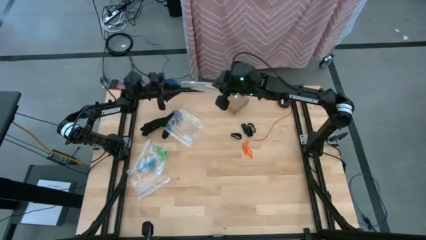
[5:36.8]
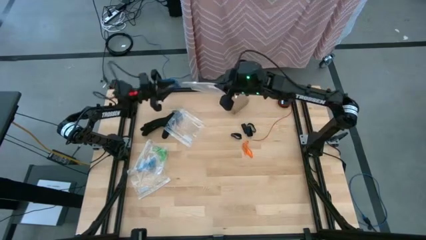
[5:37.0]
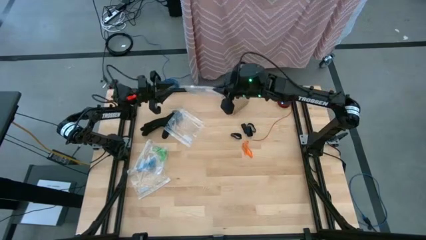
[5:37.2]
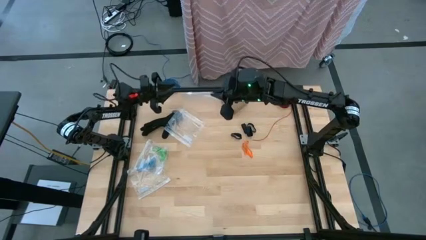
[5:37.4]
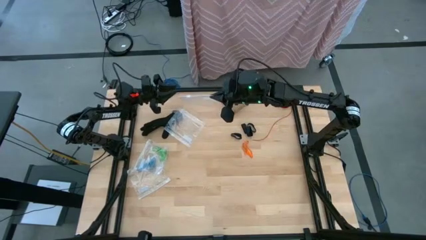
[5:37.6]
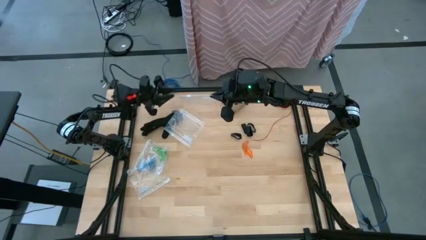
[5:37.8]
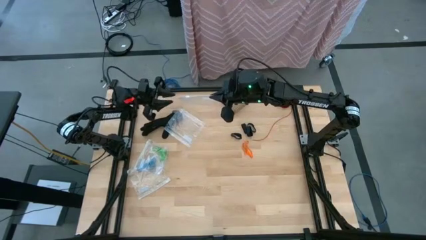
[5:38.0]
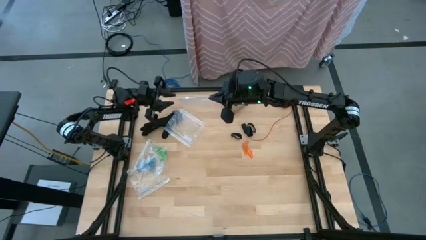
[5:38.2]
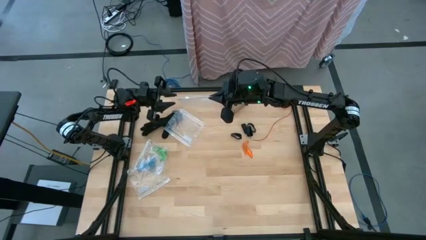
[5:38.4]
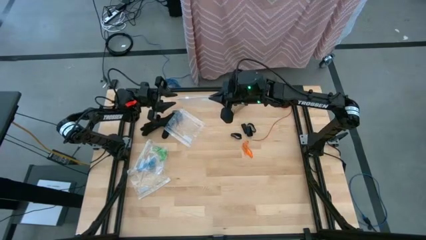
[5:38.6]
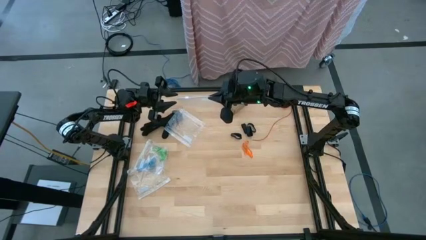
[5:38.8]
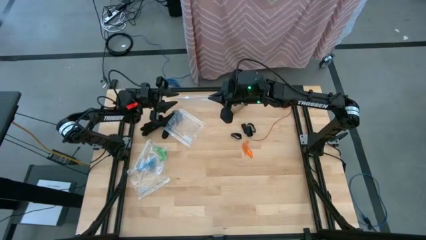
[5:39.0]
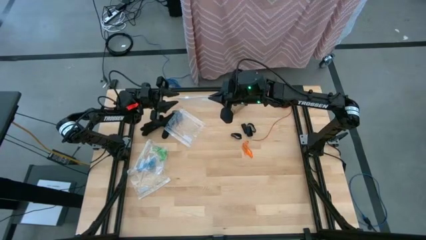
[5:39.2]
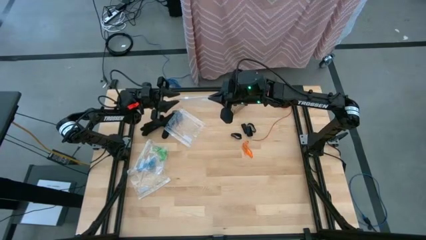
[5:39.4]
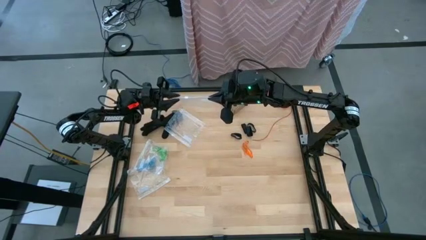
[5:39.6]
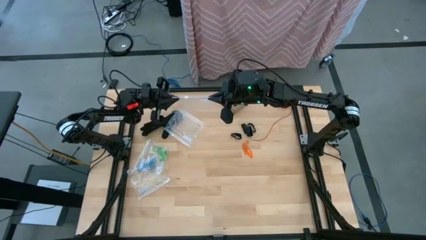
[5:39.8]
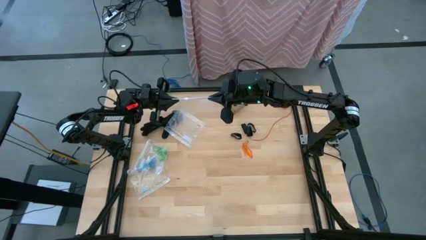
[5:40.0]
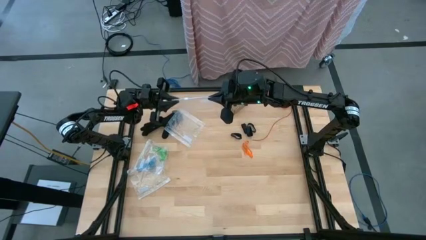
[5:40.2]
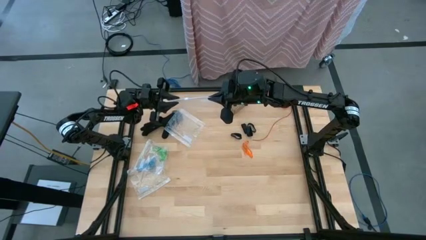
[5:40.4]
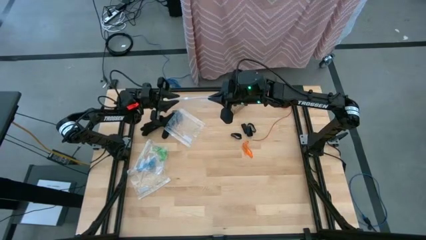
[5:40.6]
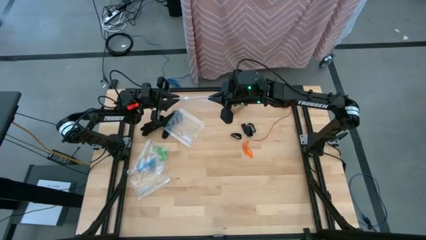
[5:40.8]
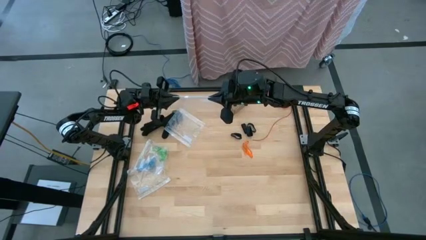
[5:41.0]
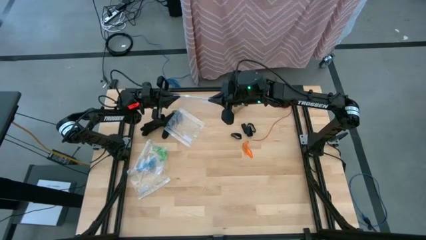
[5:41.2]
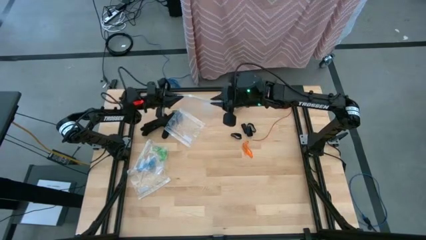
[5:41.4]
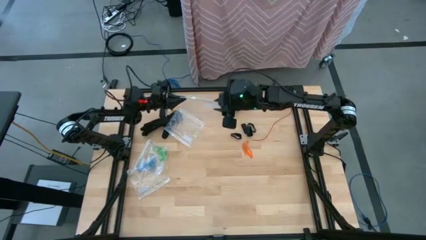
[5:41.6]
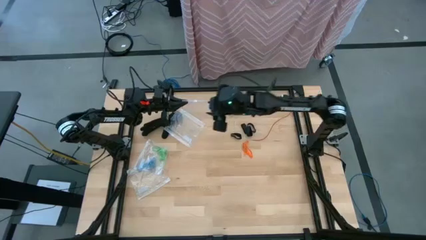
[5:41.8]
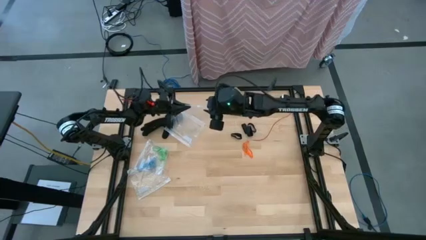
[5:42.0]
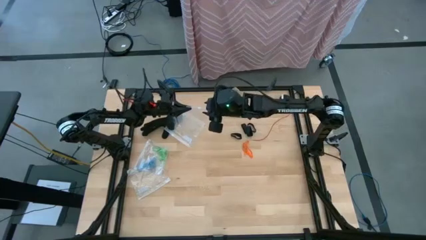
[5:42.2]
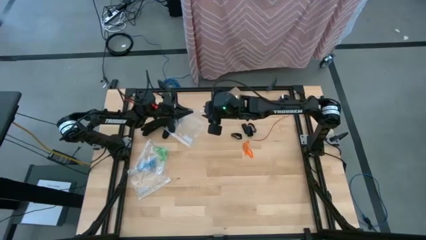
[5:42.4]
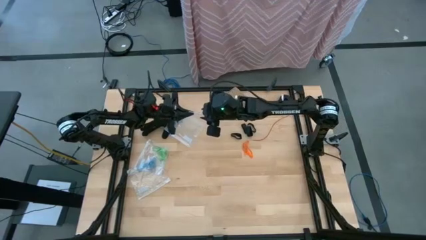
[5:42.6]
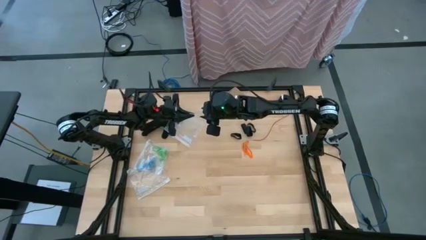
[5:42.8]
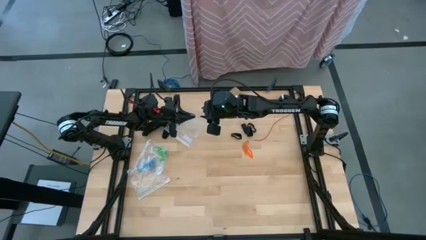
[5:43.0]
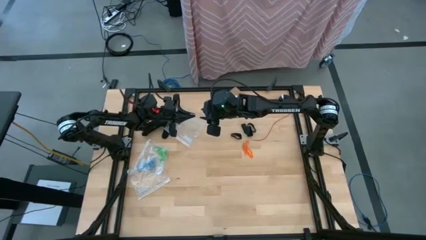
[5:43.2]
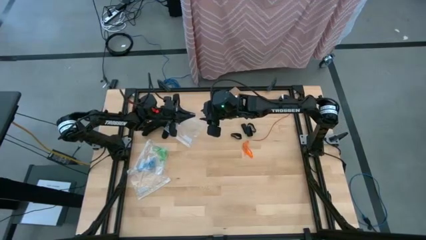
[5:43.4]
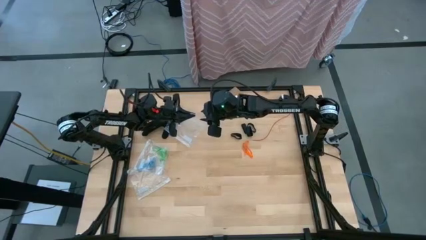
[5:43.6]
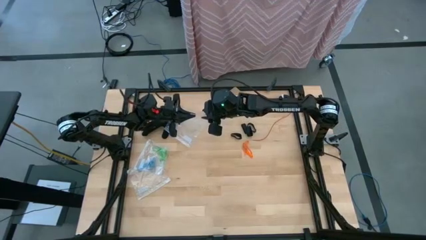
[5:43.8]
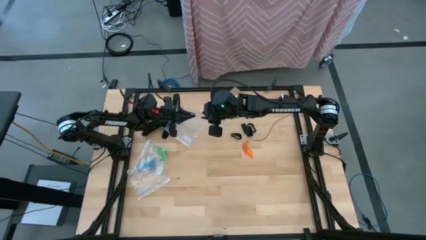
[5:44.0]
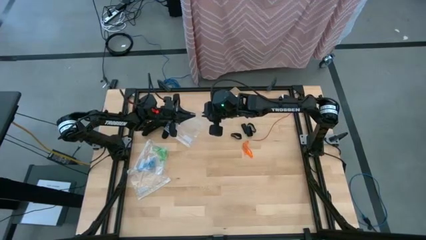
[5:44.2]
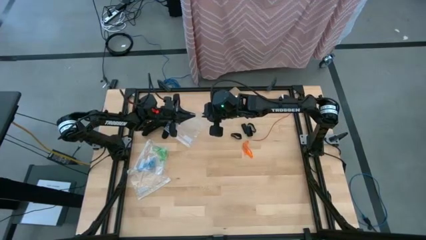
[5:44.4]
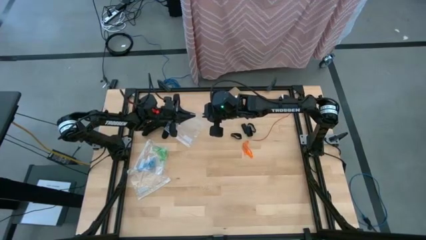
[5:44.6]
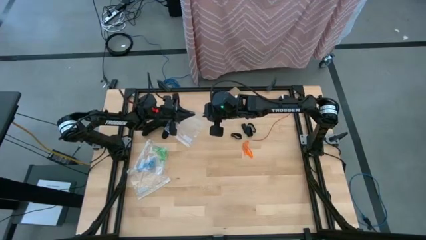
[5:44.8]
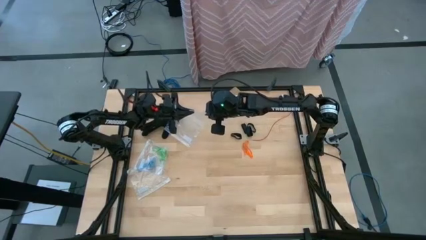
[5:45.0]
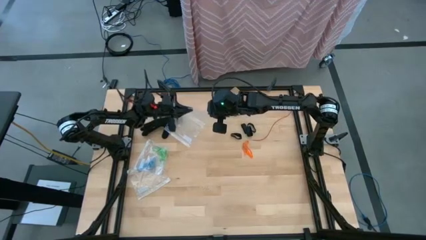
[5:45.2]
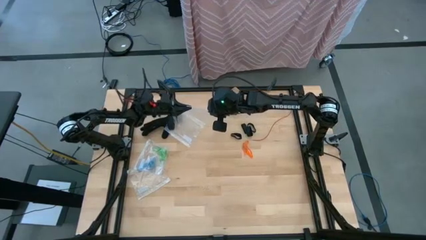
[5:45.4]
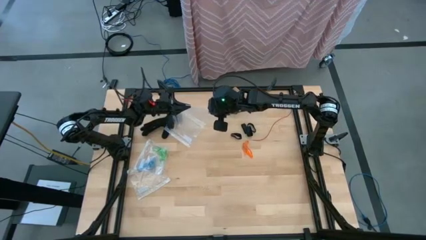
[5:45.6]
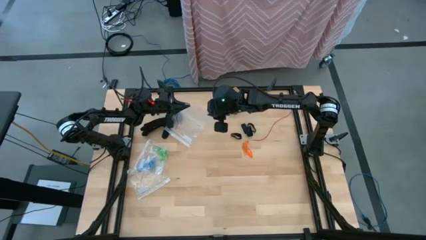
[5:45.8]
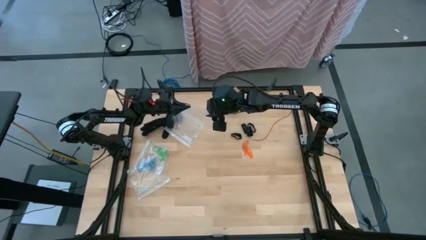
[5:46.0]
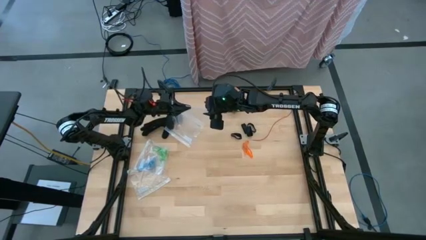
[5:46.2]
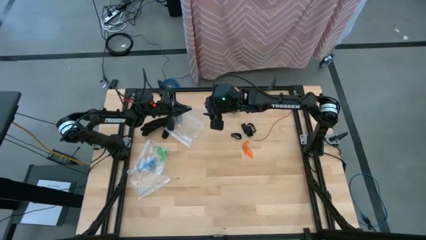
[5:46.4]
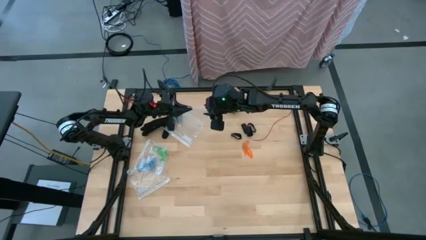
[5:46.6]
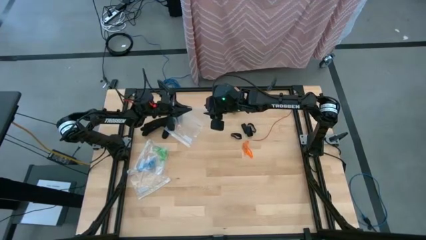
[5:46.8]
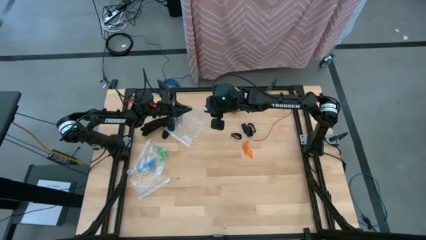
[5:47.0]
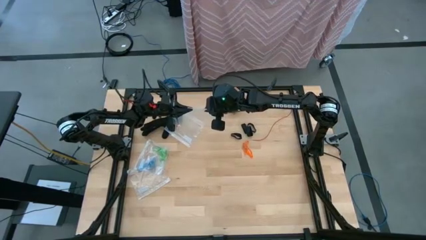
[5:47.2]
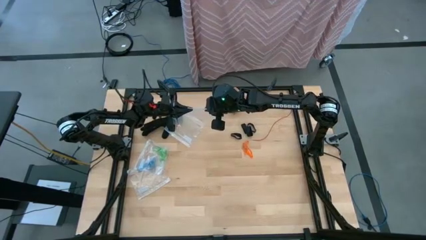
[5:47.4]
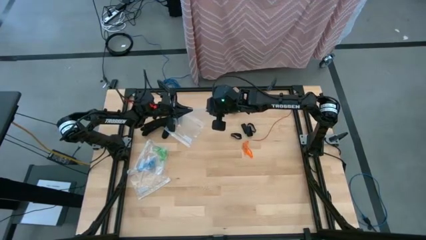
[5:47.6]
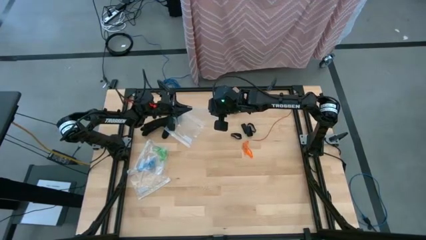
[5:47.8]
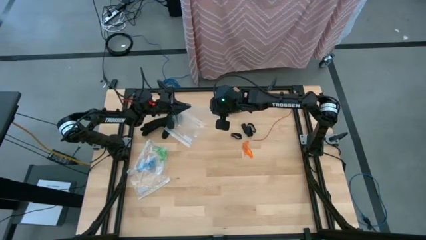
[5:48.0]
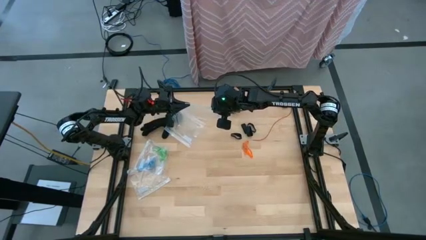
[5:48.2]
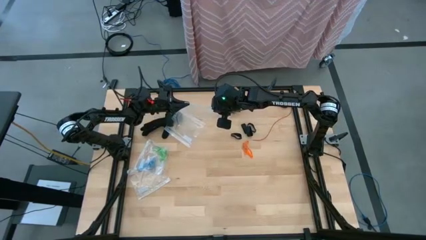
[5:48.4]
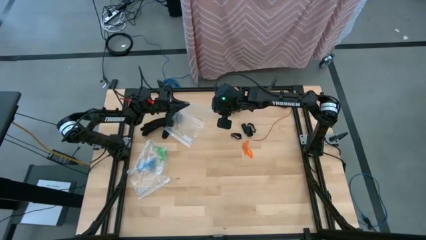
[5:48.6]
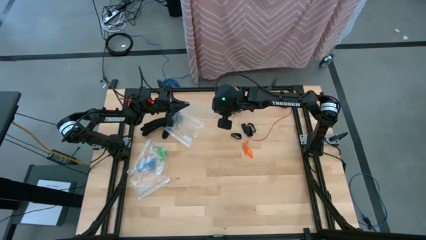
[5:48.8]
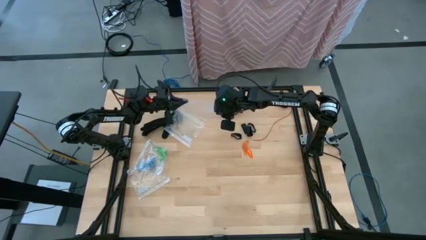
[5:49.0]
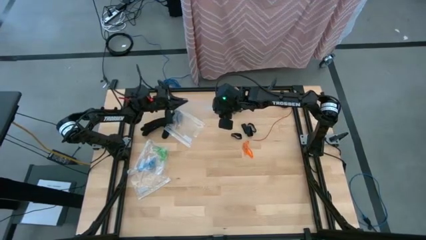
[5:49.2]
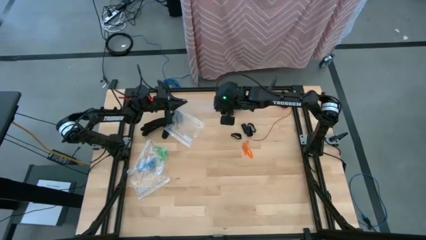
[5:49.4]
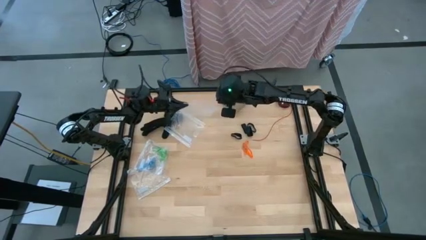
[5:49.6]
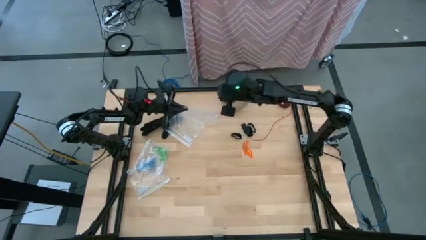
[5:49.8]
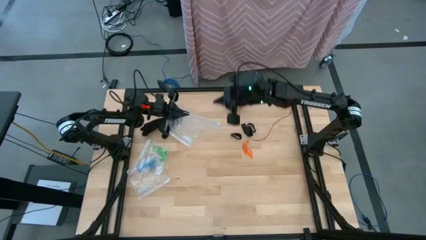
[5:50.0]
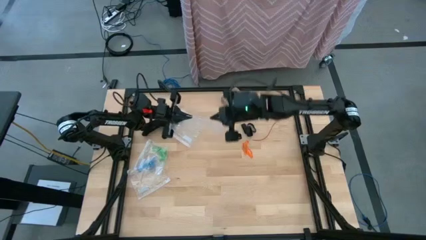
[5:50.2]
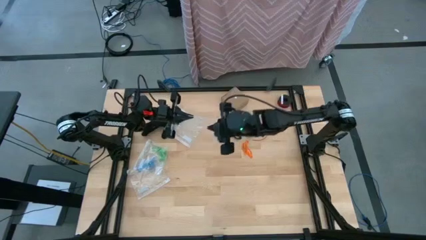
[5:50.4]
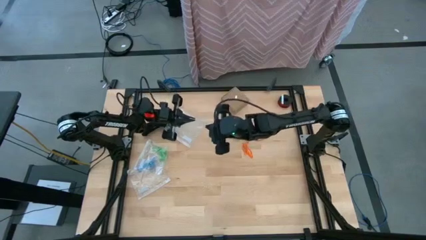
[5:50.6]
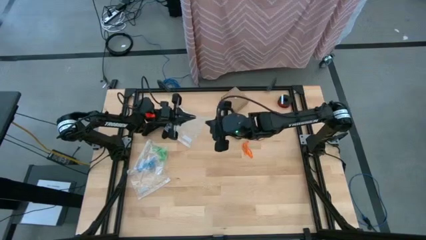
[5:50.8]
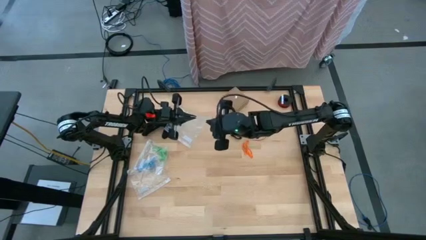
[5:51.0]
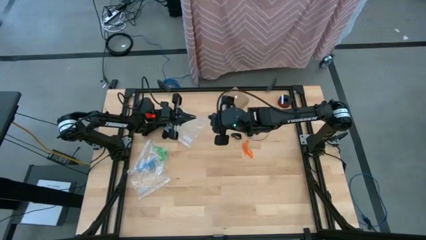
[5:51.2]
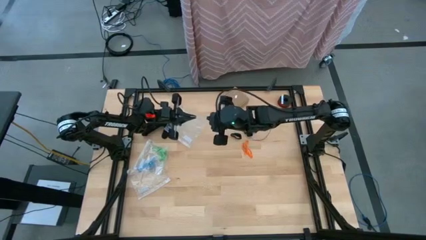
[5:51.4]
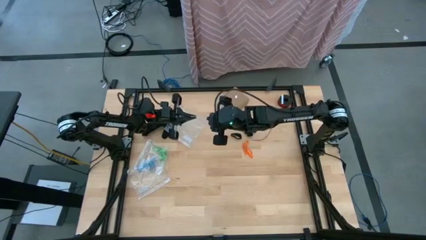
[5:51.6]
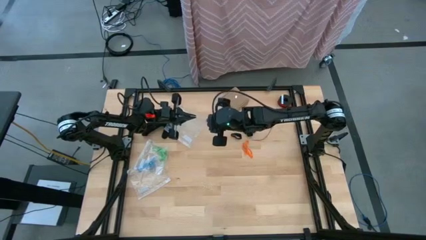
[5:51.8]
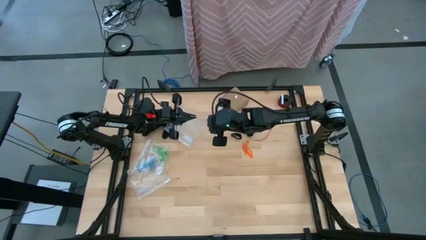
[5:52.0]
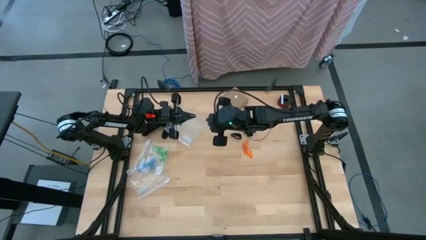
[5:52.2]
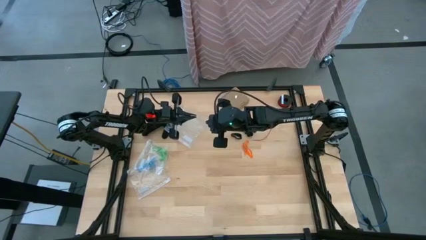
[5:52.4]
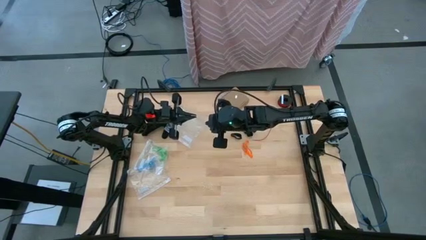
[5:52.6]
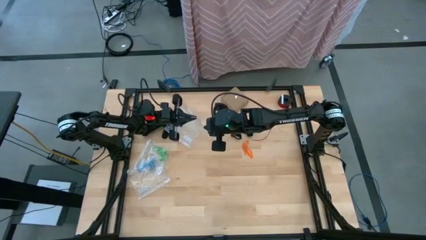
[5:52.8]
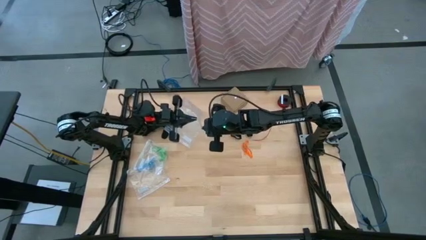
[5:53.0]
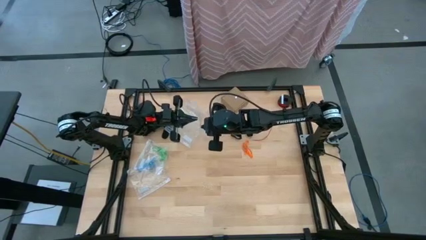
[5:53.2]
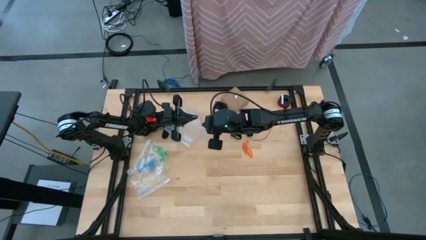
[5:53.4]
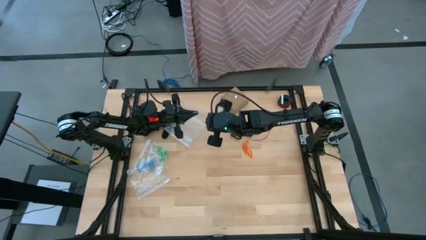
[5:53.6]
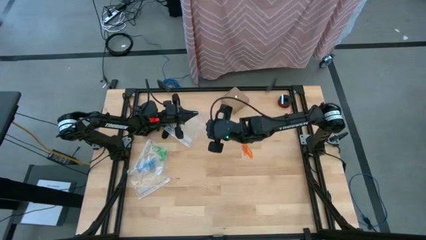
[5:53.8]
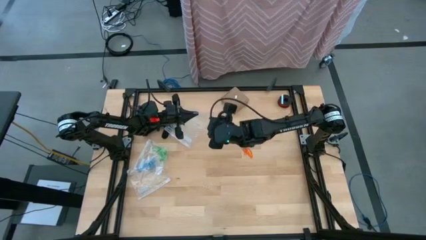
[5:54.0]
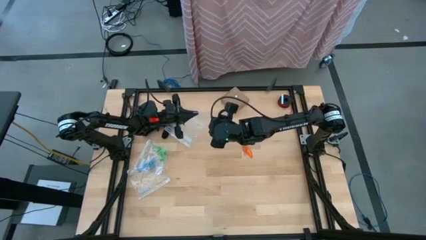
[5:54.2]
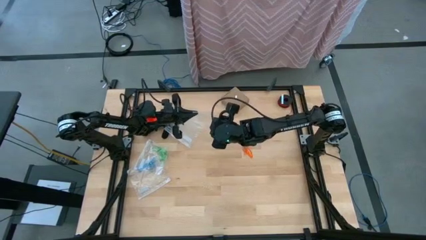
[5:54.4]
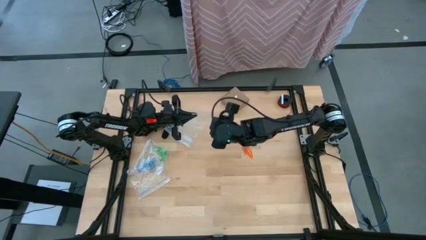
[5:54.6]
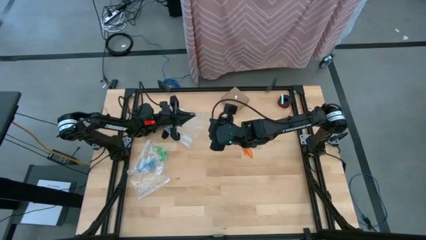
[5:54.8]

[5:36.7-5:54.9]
Task: Sort rubber bands
Open the transparent zip bag
